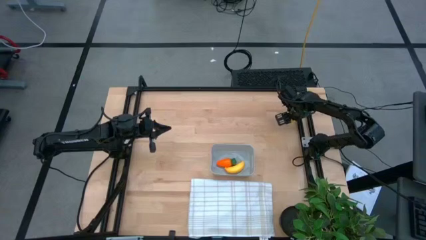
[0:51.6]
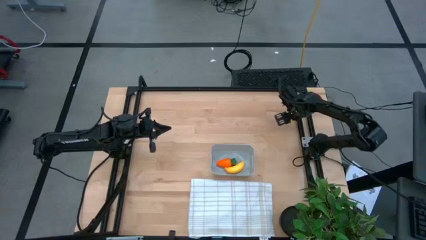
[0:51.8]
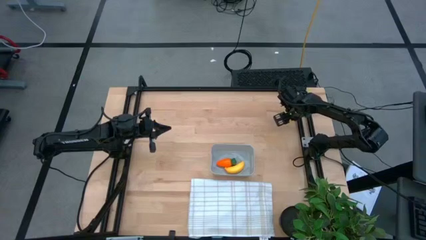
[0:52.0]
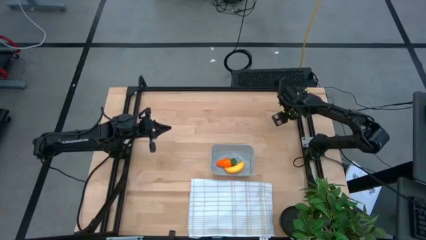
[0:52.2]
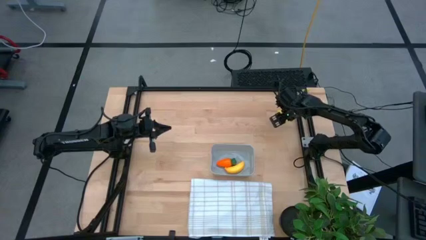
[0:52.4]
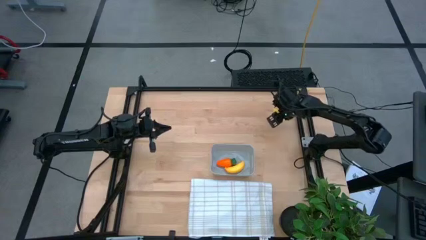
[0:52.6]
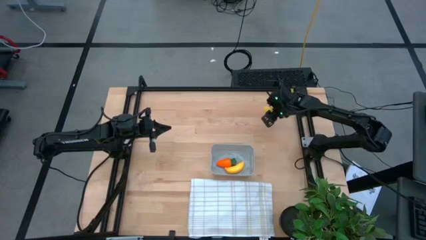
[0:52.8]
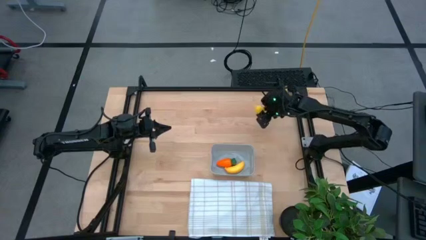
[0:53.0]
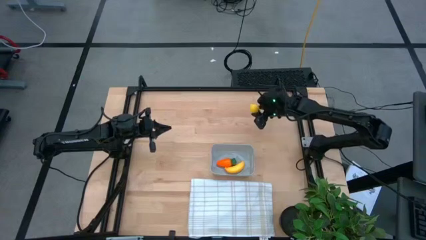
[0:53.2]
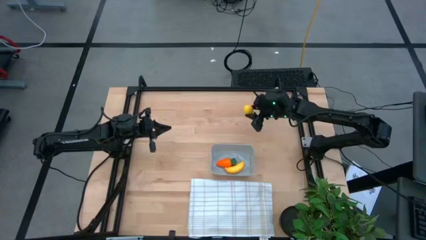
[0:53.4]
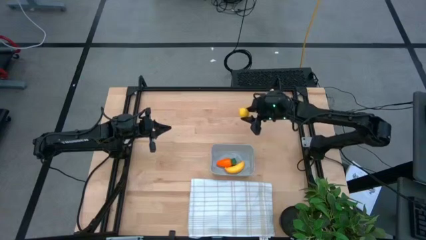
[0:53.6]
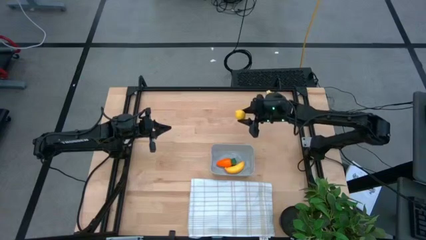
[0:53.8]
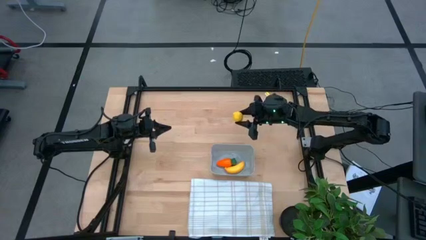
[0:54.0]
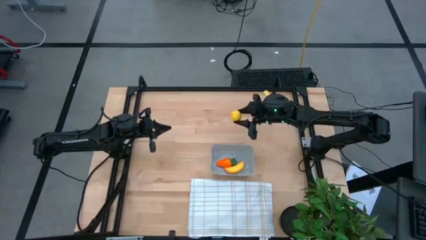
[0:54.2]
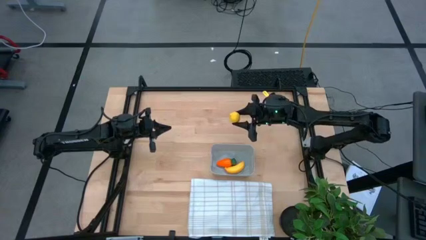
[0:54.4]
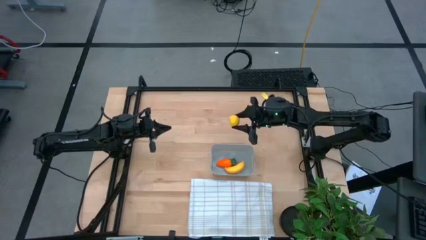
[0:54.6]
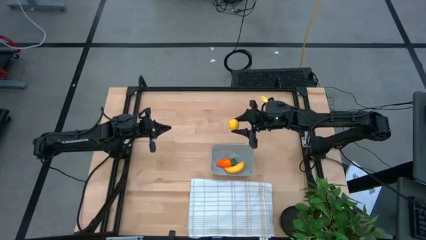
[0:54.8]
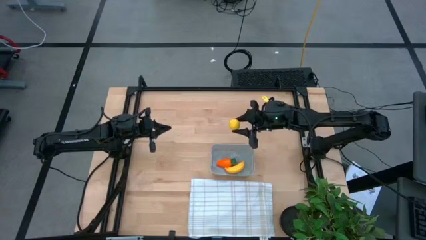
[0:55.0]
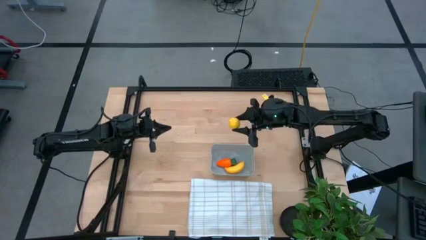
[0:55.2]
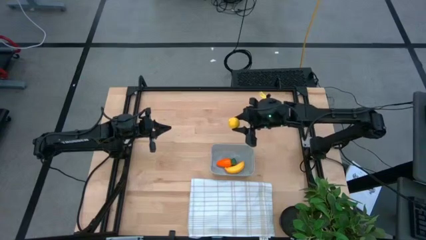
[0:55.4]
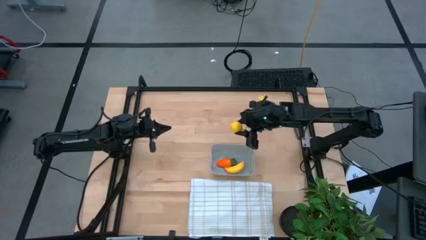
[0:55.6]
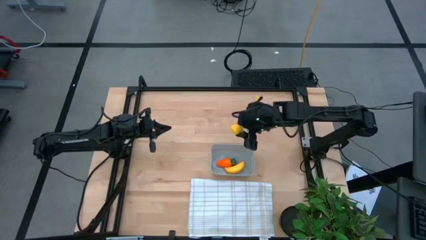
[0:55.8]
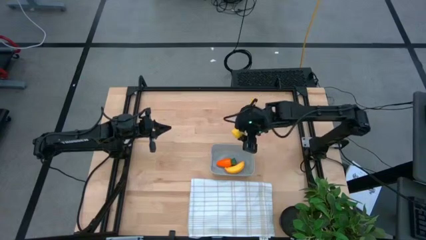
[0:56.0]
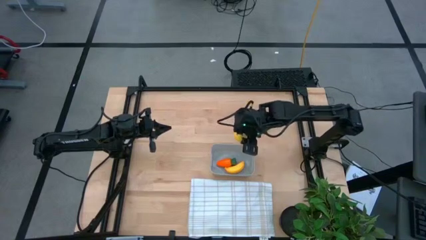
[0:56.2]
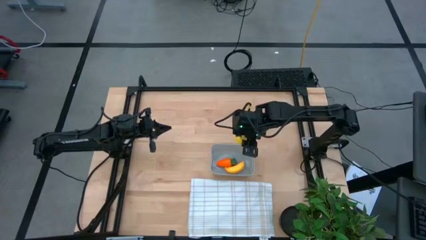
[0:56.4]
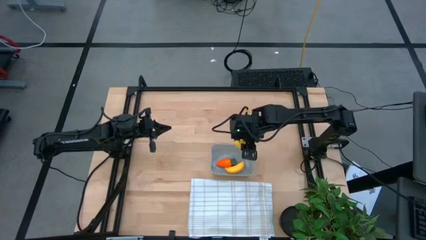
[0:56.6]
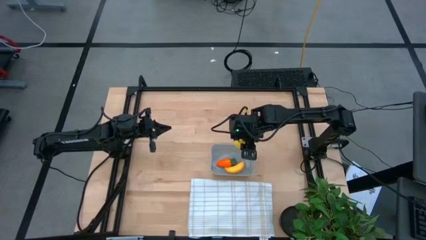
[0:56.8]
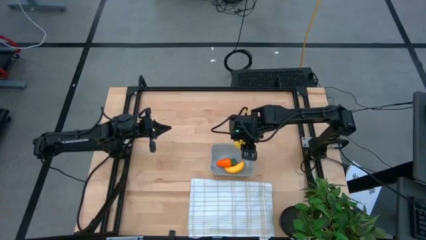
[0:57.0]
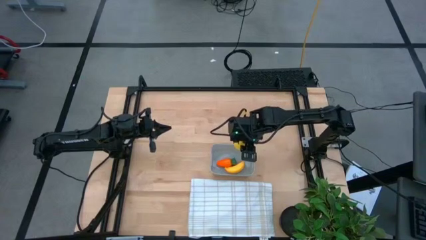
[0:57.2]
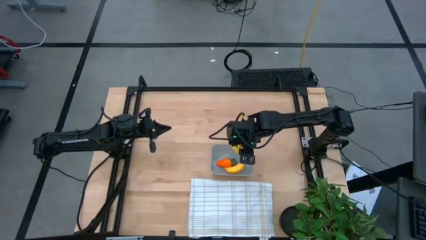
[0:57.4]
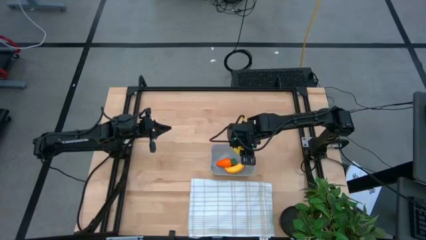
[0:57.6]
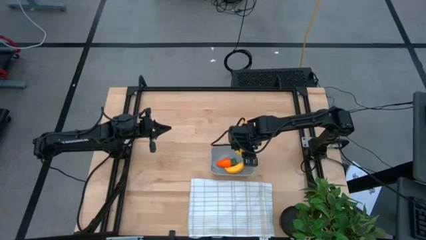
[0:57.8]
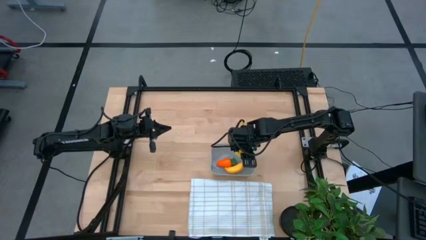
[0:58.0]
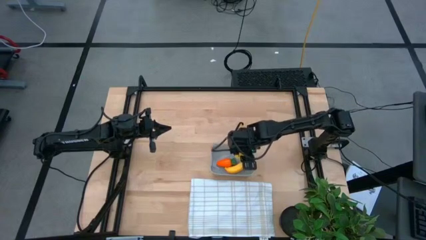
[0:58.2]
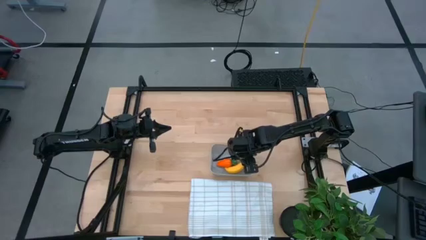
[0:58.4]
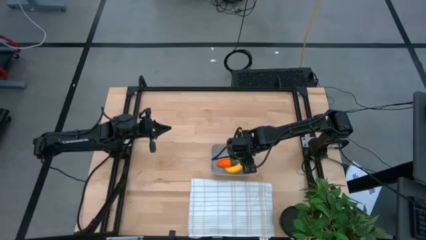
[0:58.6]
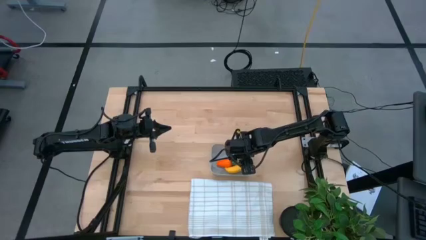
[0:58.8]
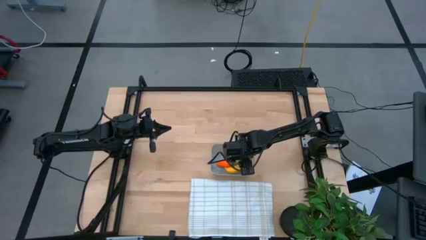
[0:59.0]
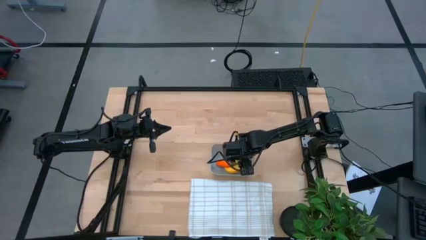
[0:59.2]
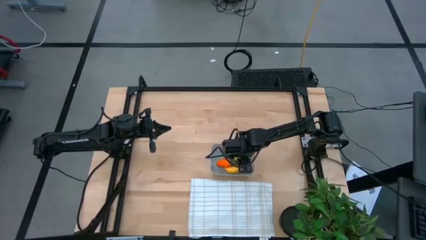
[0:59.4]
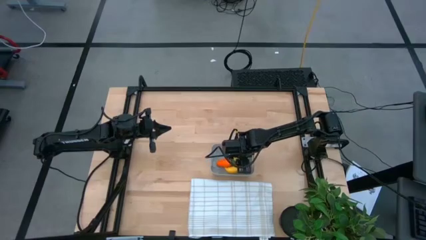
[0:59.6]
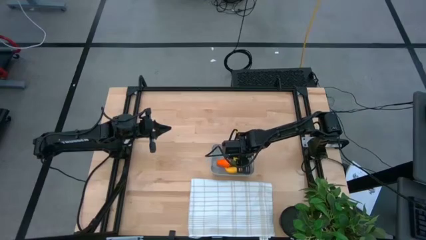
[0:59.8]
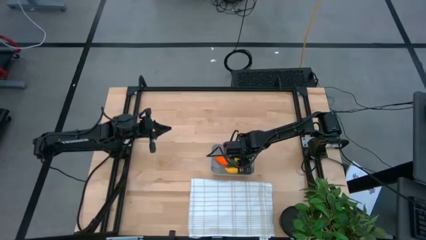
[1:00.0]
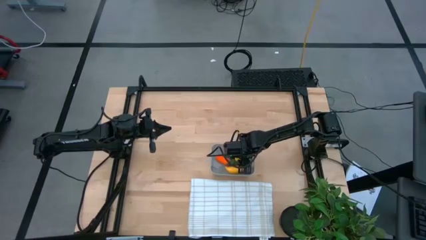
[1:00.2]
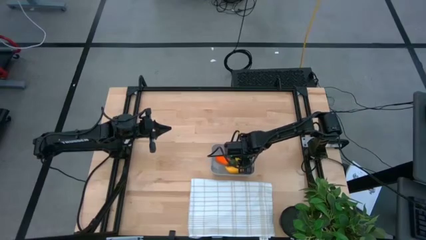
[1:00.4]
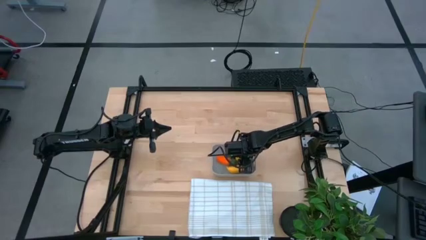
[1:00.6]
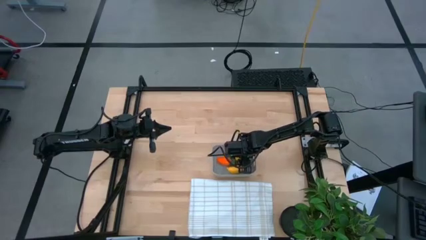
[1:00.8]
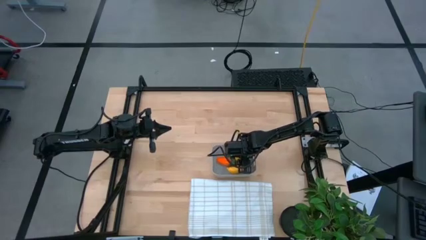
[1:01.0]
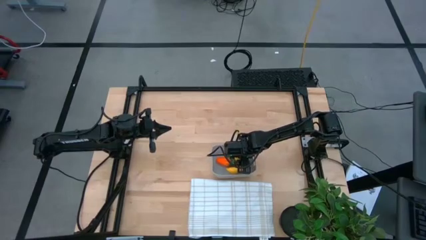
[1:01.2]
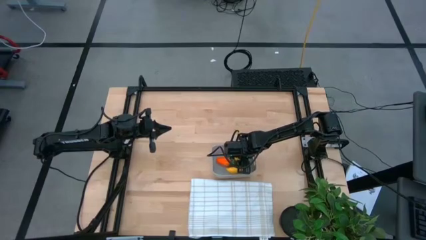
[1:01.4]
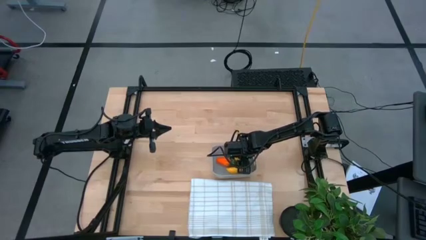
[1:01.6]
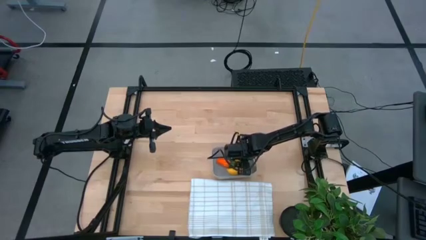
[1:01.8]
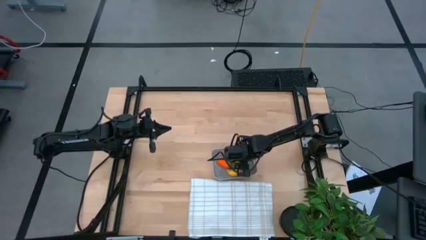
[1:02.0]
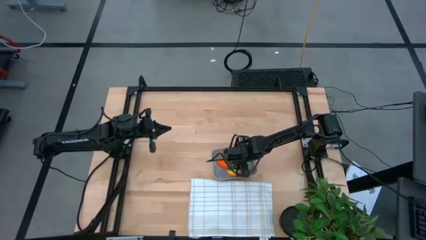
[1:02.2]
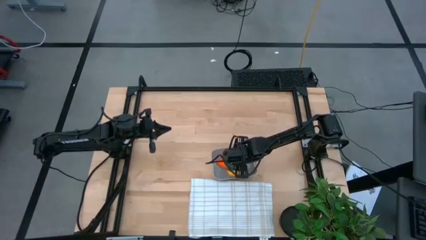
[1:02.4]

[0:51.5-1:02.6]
Task: Pick and placing Produce into tupperware
Put the lemon into the gray bin

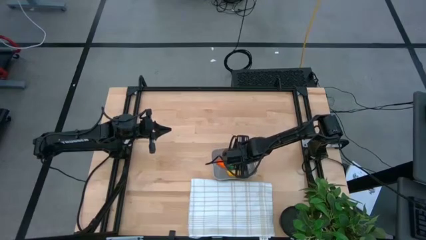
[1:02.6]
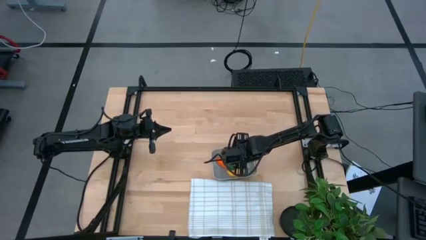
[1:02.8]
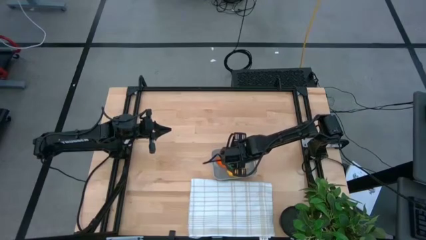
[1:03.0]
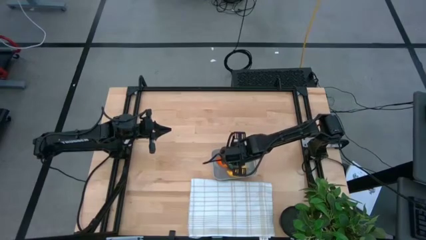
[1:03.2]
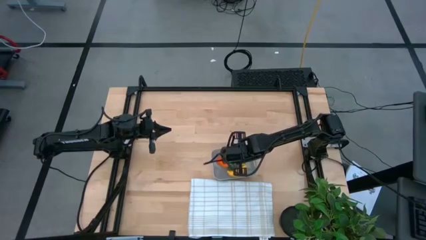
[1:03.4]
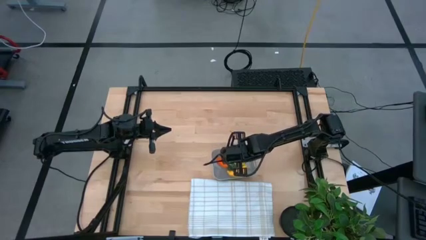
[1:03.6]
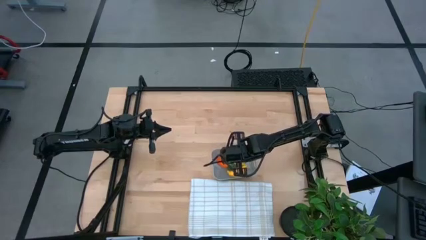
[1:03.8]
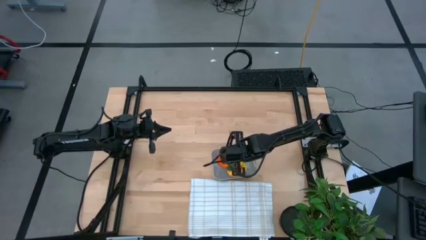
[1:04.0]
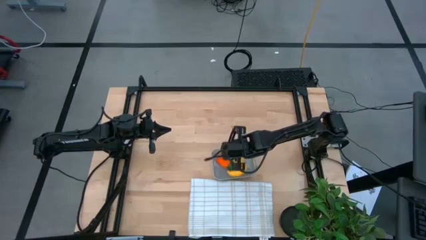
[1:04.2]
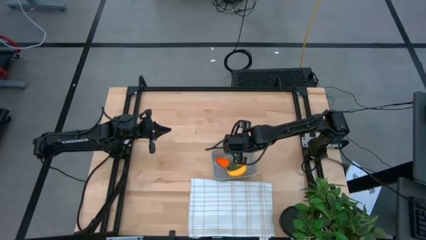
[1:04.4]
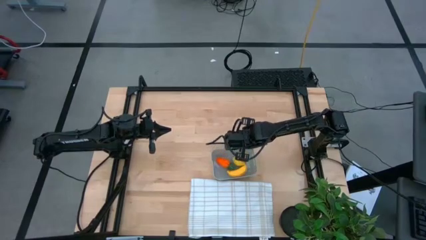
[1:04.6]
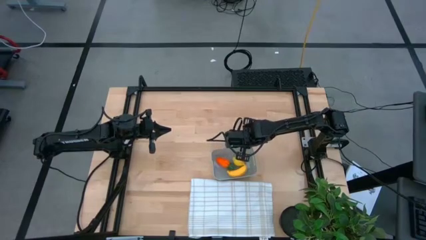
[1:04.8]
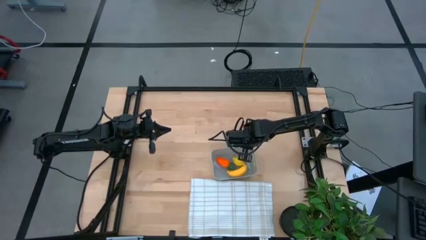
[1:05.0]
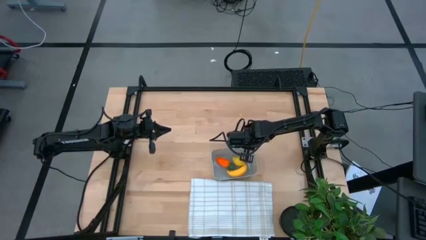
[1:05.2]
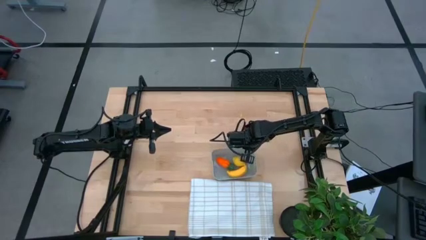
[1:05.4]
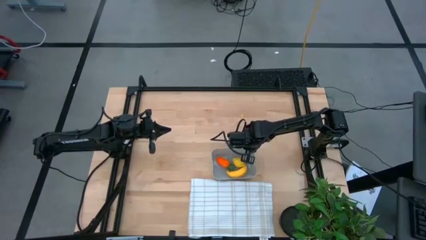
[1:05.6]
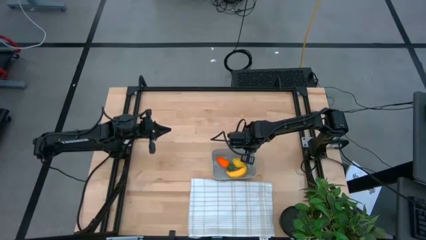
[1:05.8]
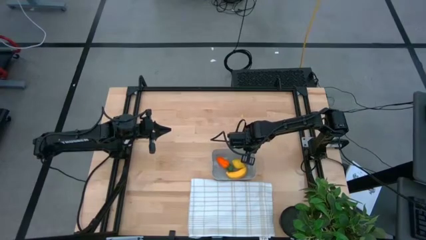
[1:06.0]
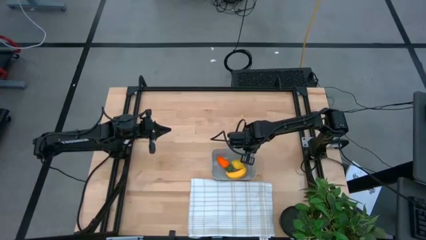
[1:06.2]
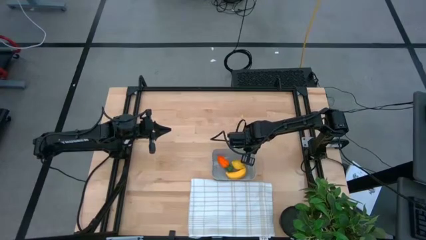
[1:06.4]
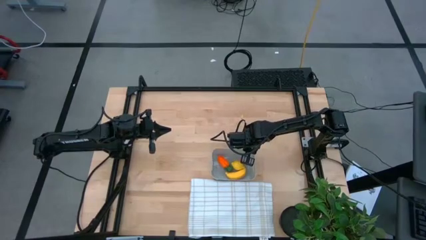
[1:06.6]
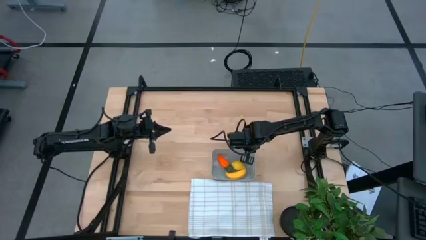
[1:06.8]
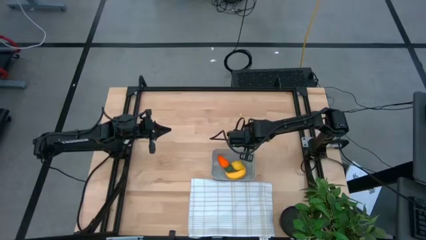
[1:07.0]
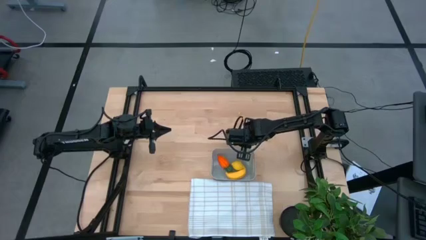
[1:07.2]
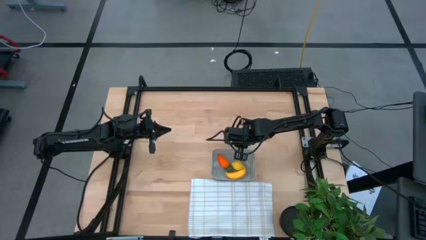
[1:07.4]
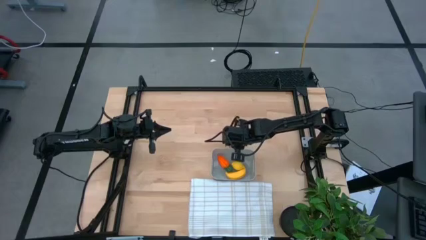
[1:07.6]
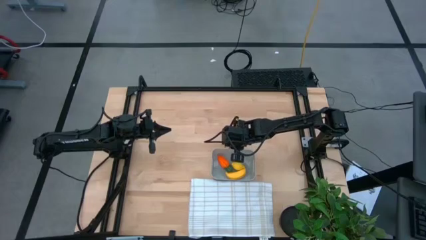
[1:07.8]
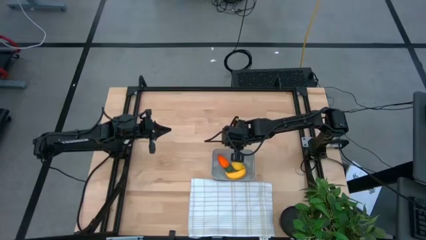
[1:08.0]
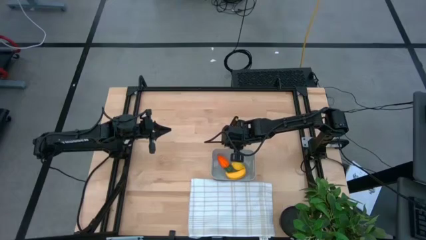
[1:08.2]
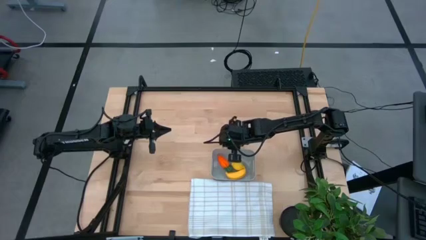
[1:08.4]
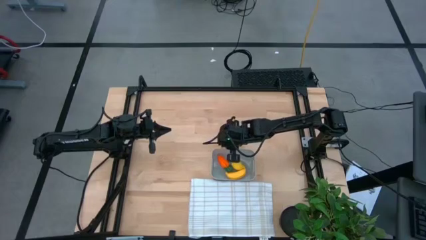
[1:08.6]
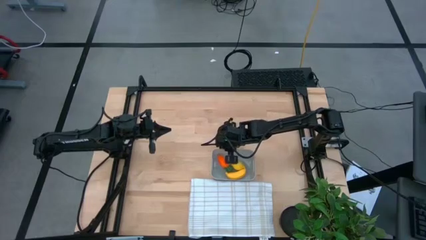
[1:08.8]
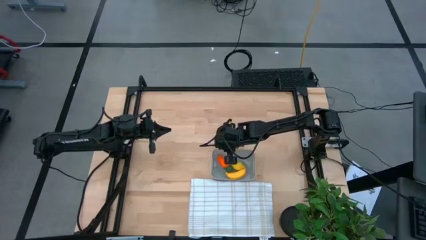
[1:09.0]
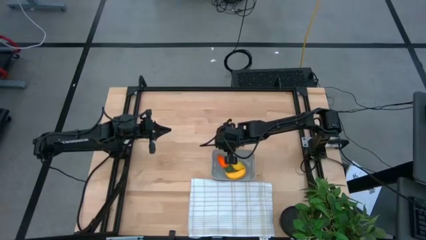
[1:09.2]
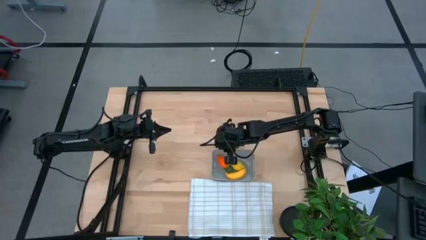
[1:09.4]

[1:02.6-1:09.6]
Adjust the gray bin
